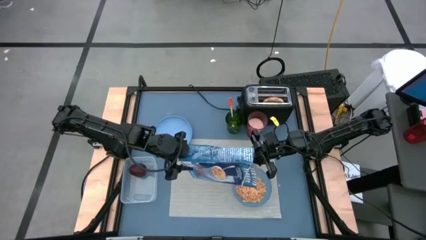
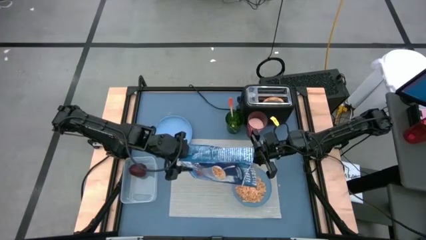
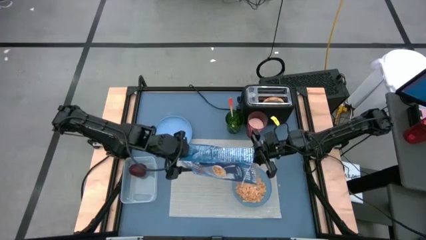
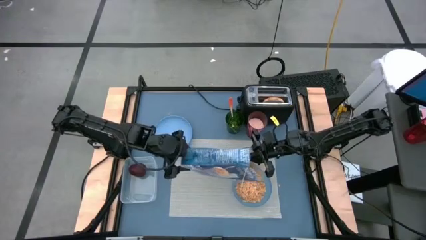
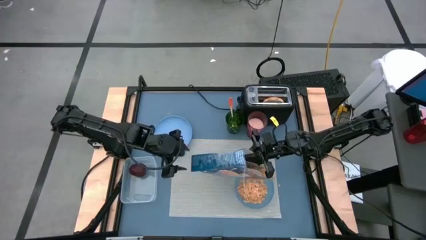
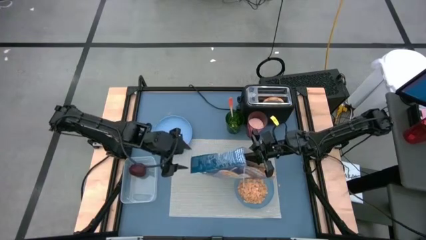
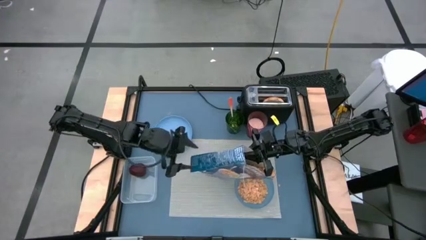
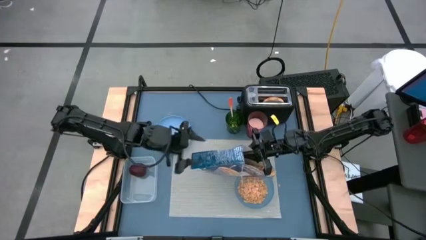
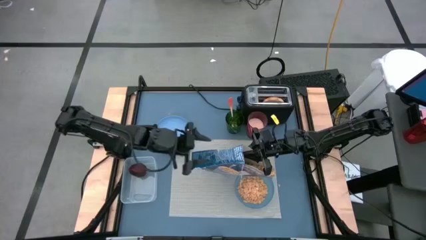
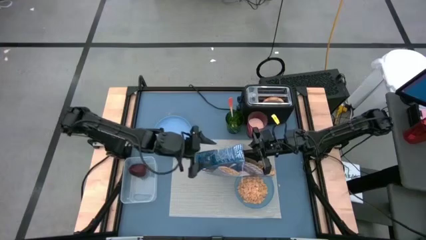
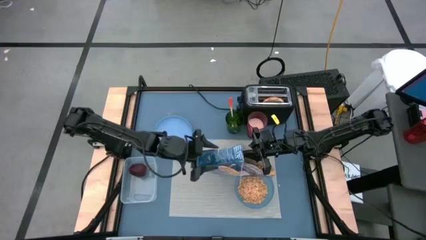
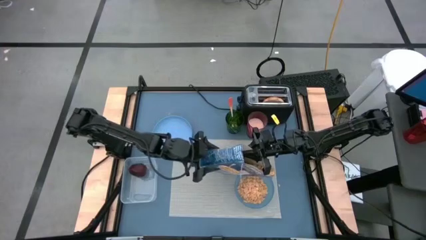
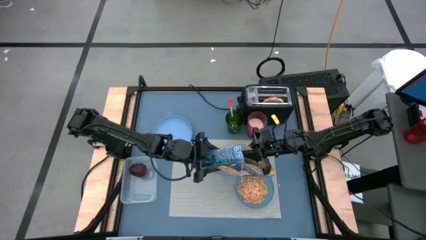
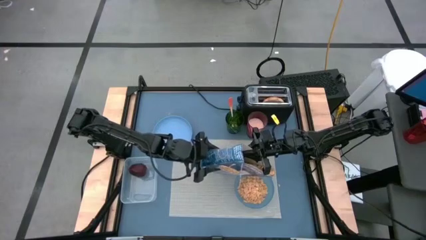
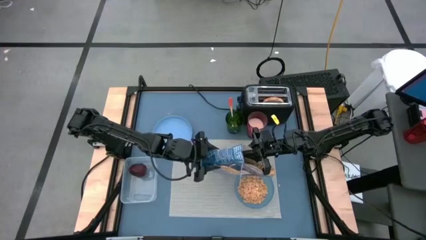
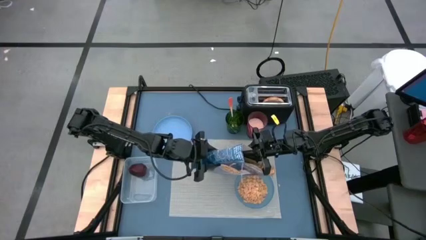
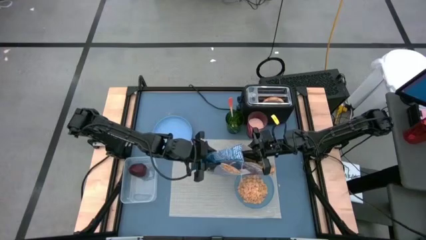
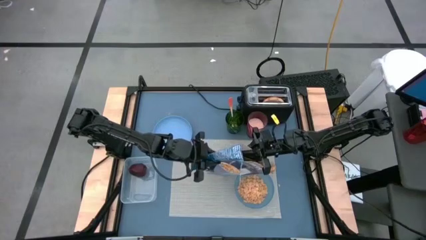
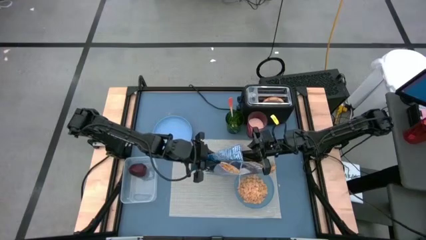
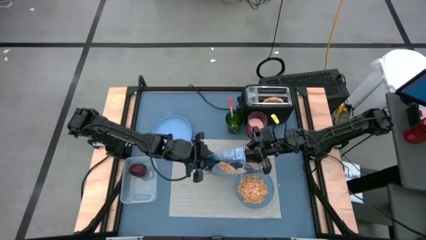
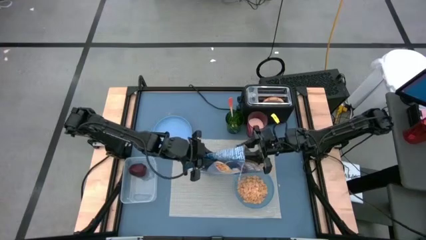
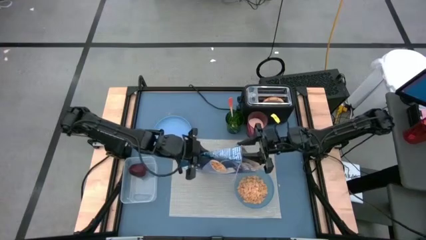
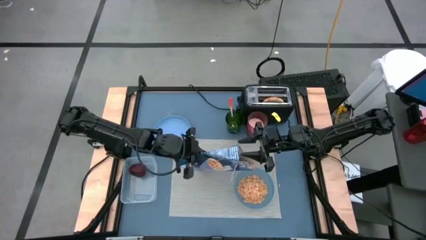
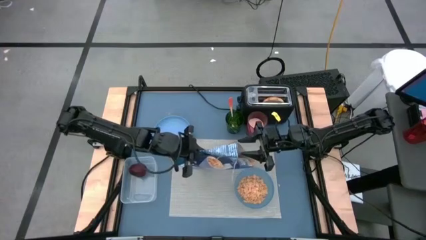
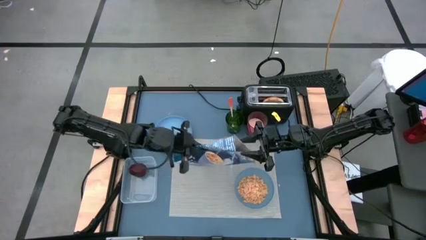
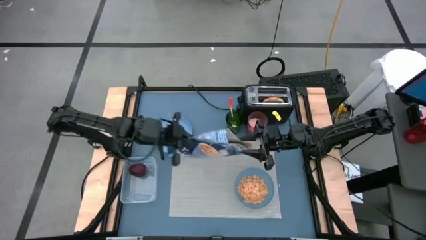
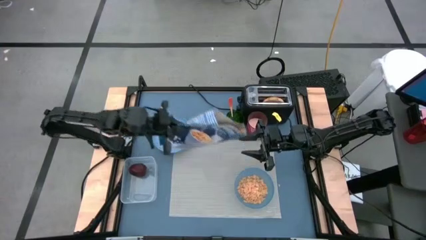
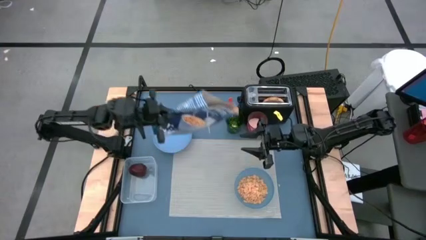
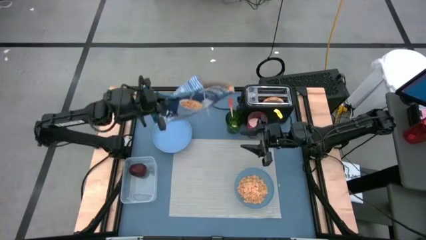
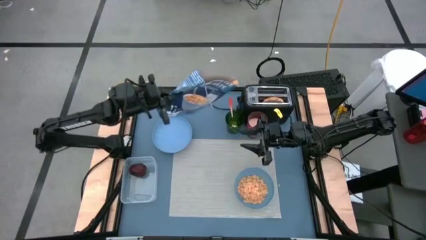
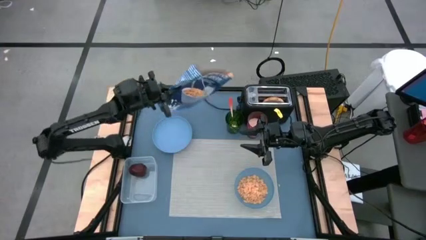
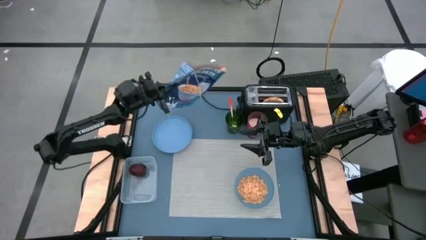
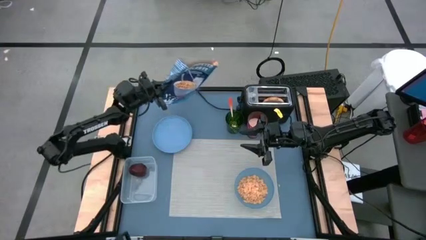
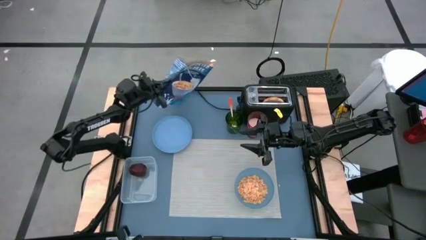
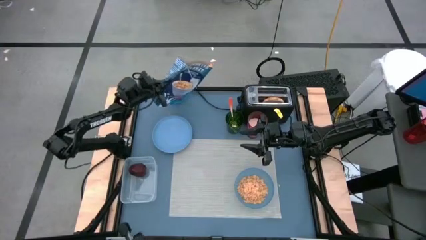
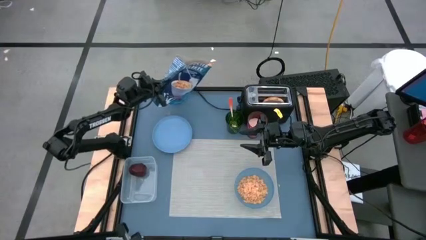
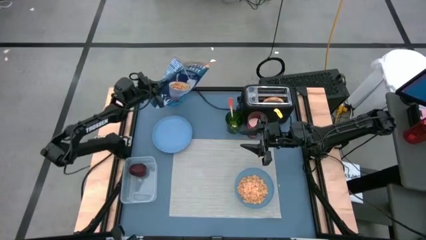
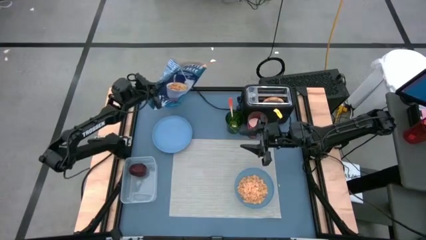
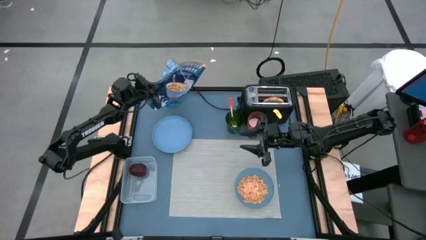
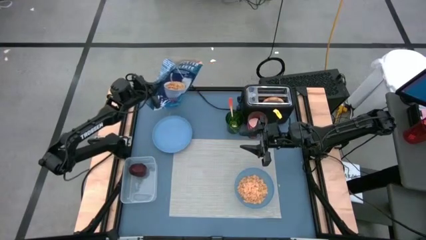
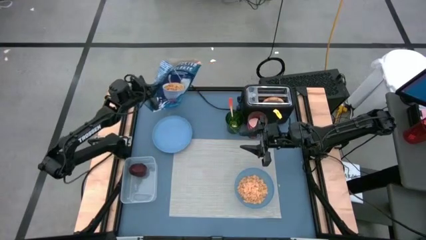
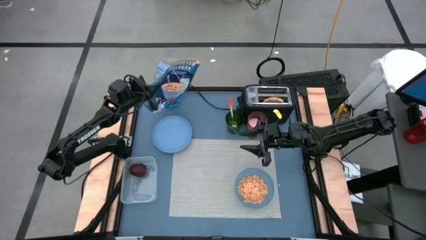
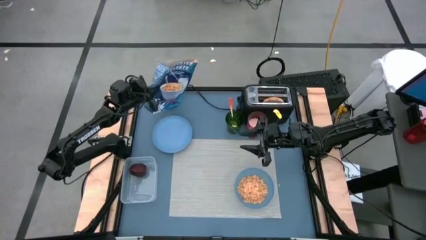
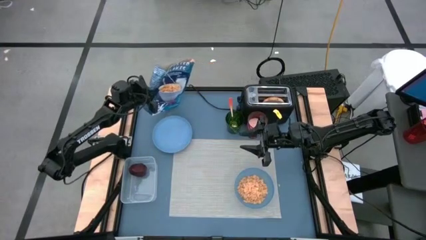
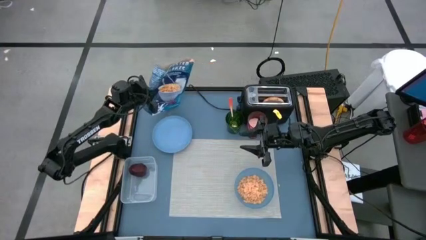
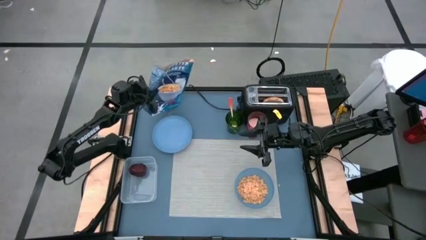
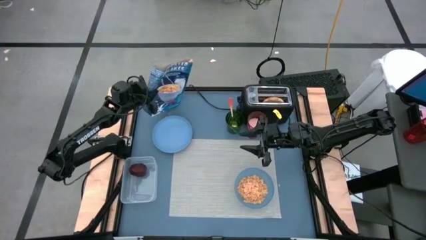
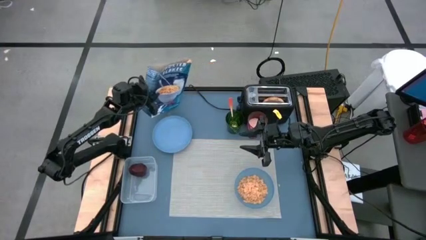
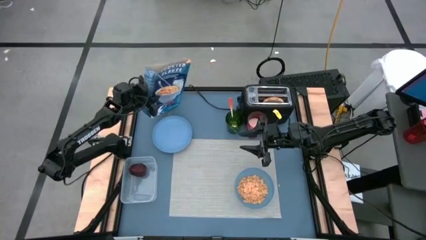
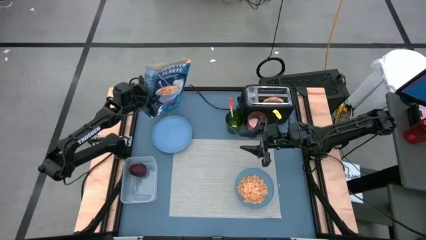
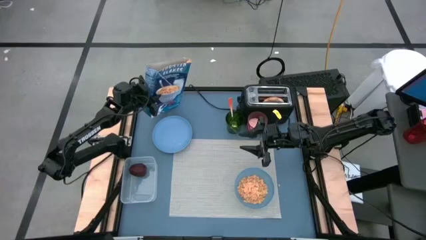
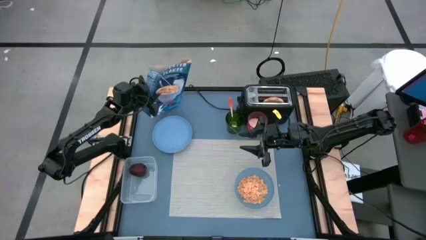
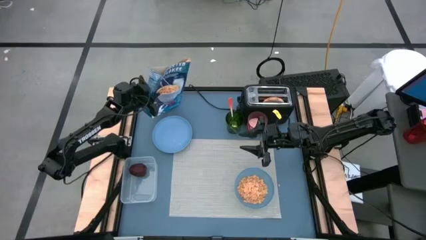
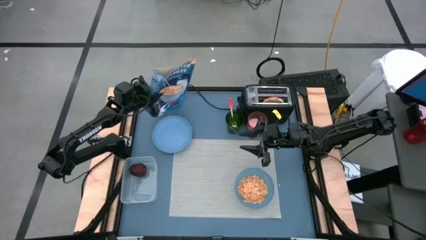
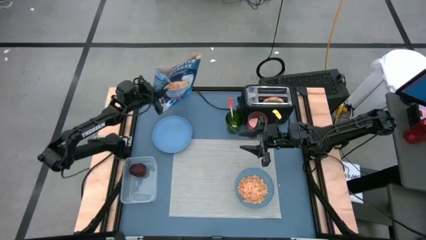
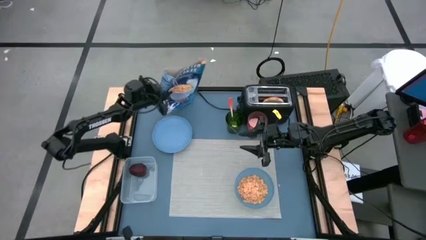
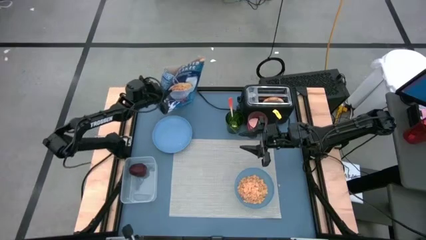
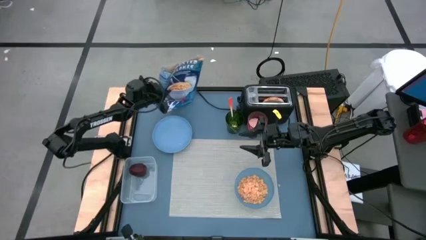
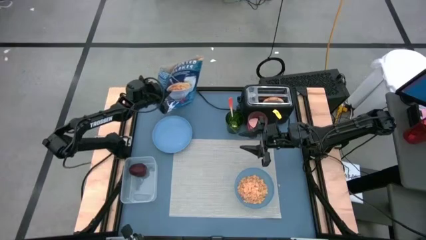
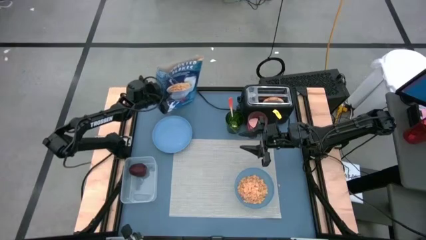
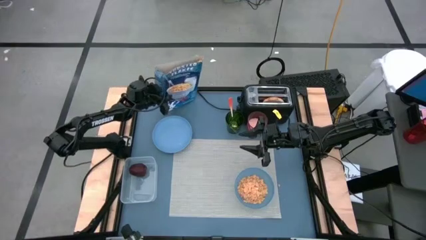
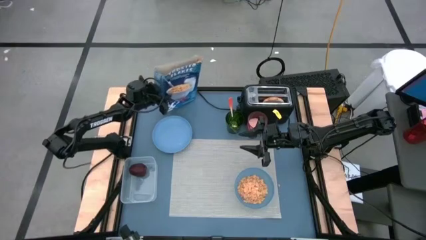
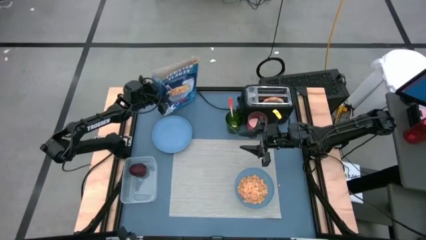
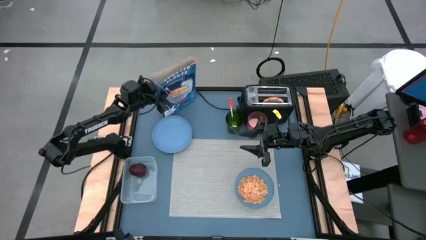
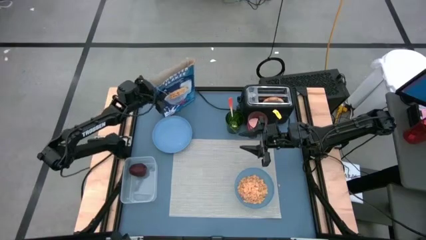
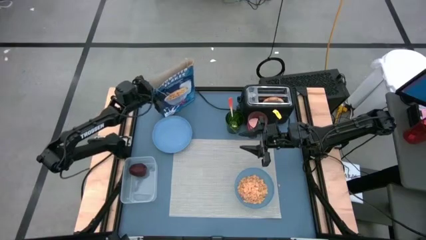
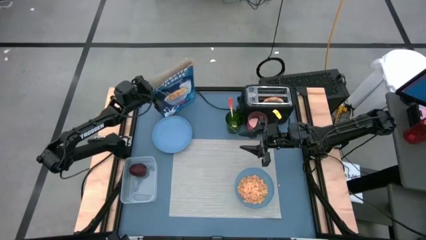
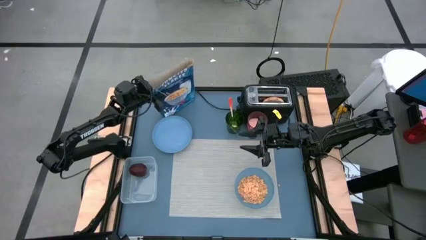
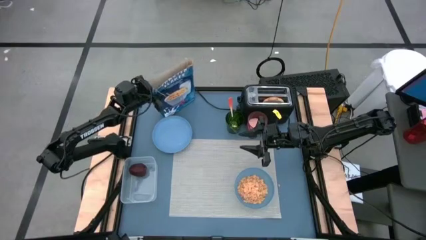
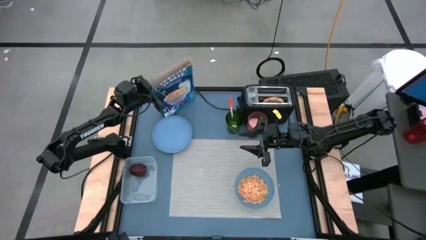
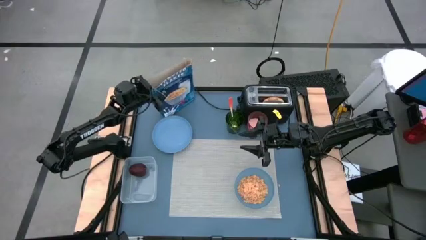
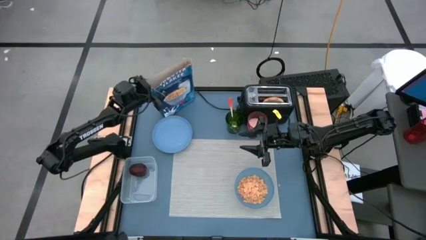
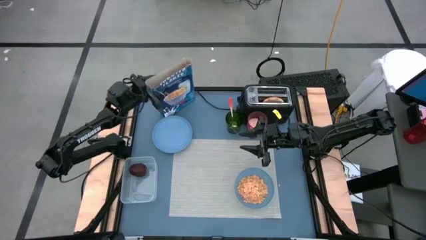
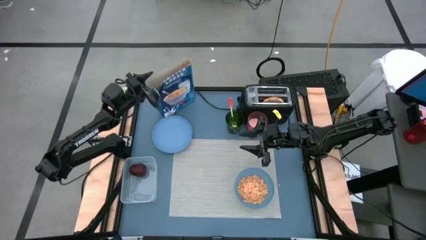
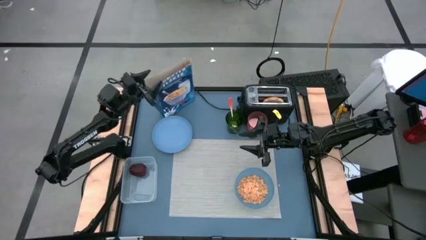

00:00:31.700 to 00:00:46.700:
Task: Arrange a breakfast setting
Pour the cereal into the blue bowl
